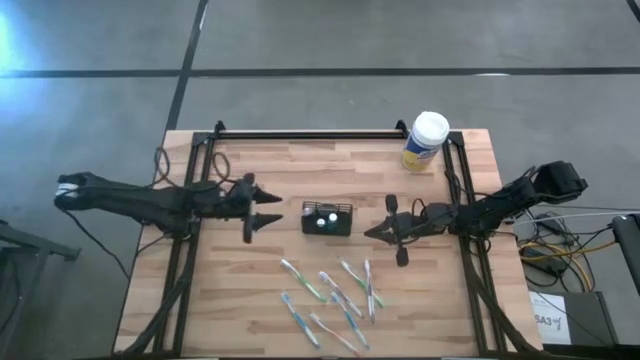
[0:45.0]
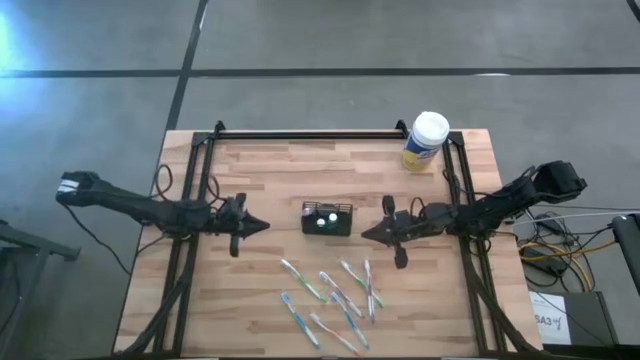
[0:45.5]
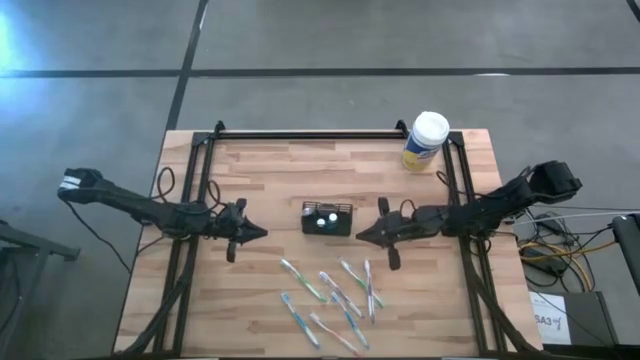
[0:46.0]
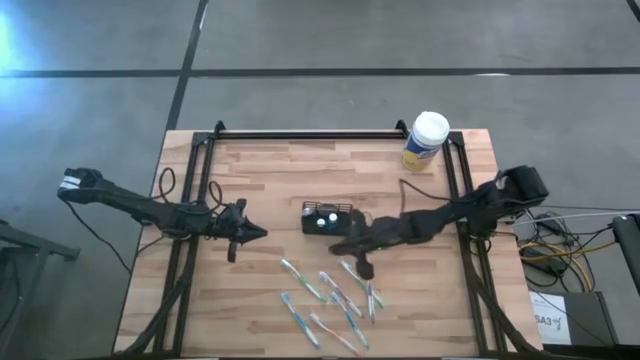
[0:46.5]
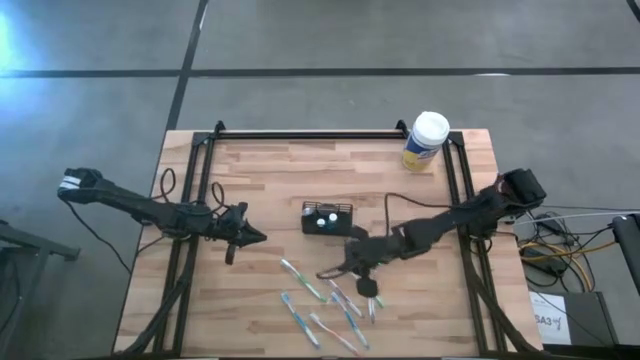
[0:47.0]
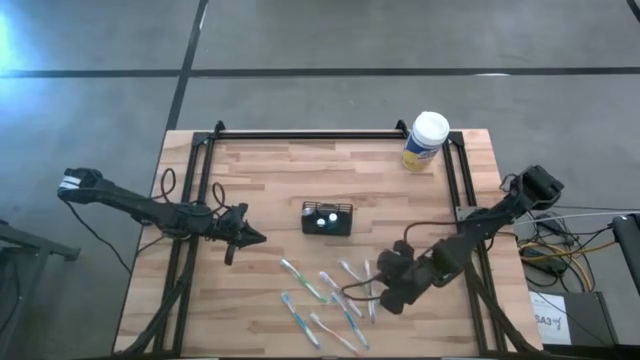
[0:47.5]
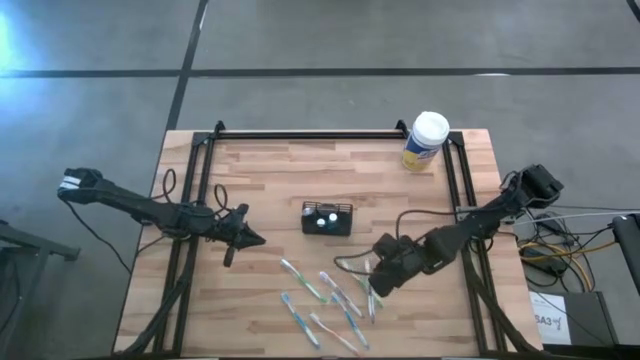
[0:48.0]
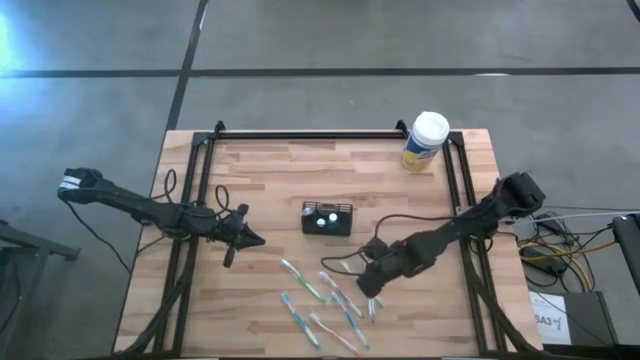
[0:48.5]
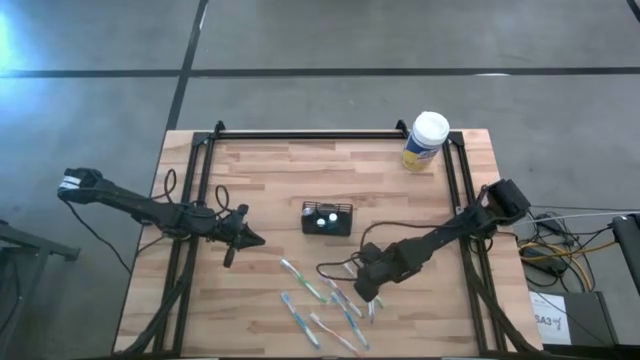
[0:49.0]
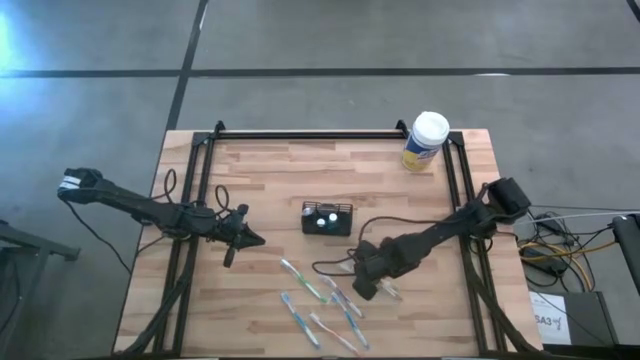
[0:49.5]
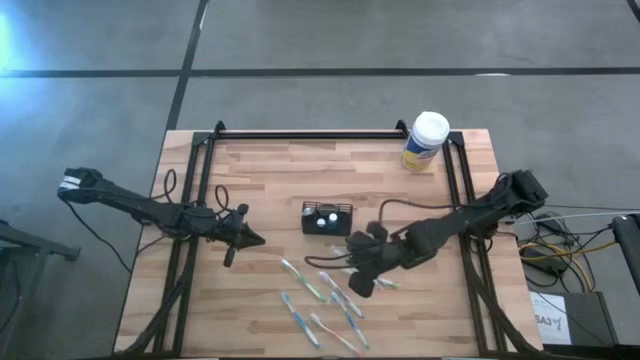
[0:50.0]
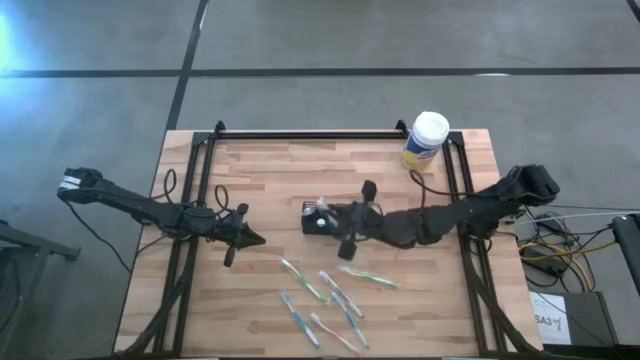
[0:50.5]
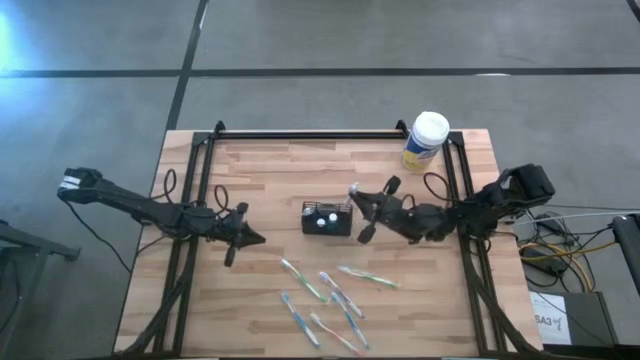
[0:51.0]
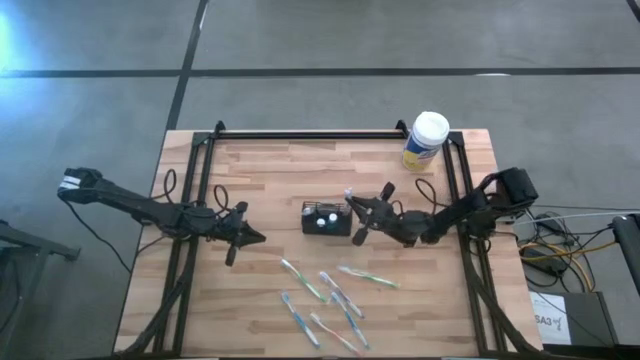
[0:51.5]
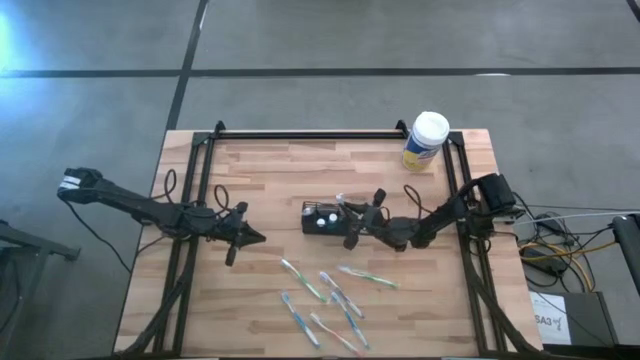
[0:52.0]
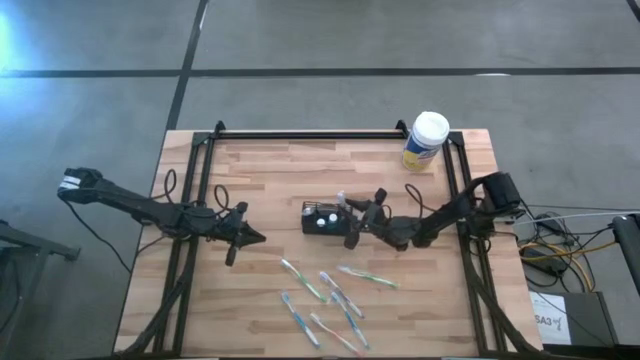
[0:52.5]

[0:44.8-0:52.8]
Task: Pick & Place toothbrushing station
Put the right purple toothbrush into the black mesh organizer

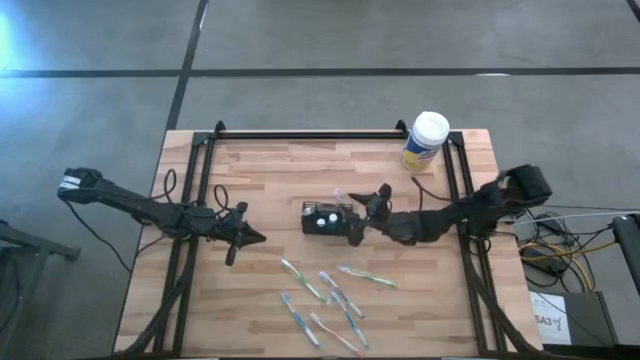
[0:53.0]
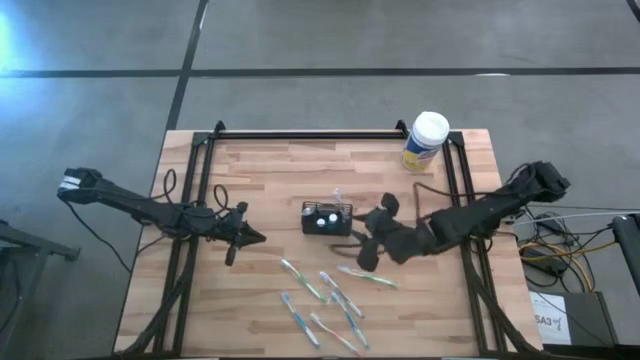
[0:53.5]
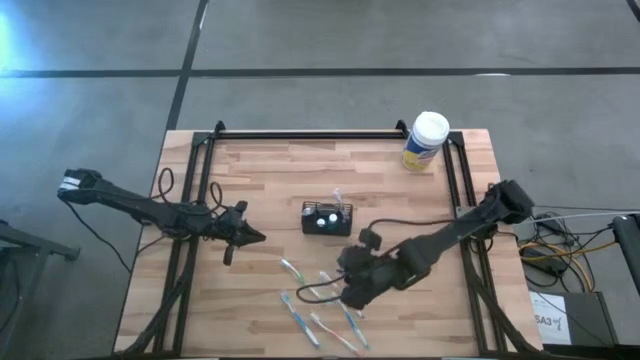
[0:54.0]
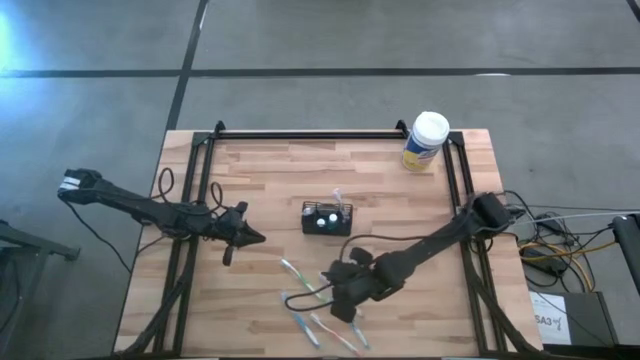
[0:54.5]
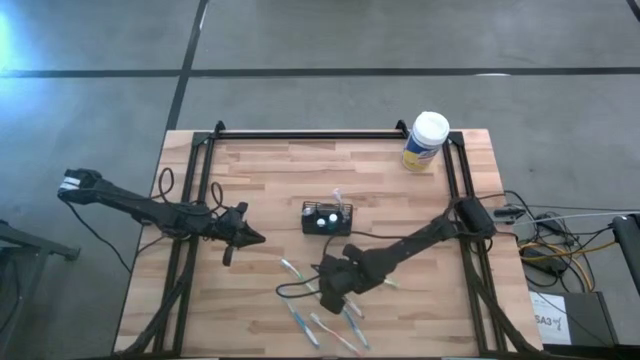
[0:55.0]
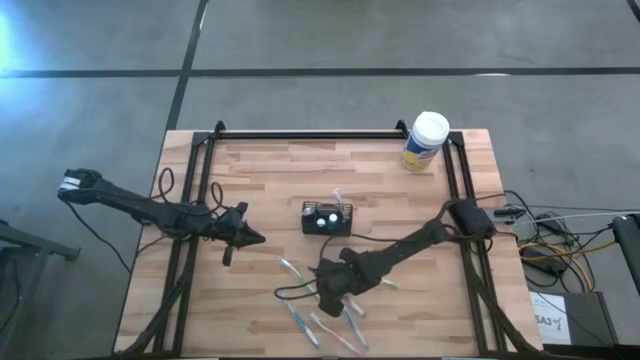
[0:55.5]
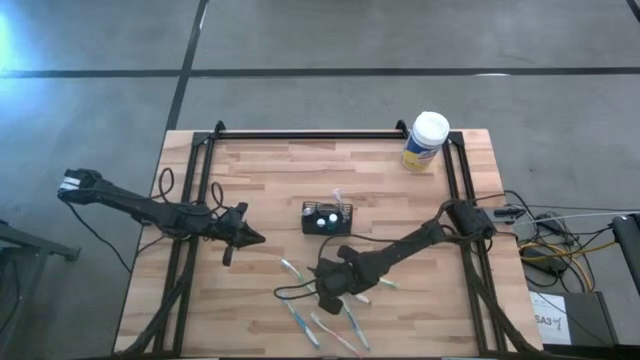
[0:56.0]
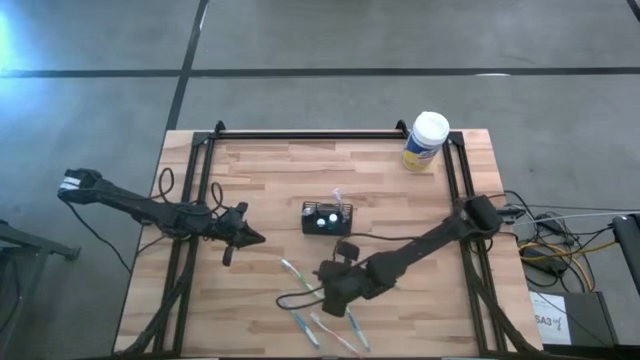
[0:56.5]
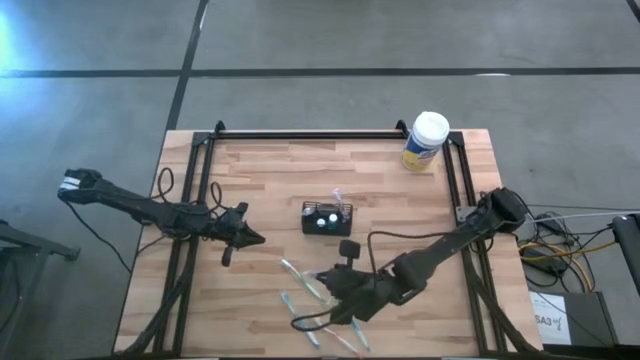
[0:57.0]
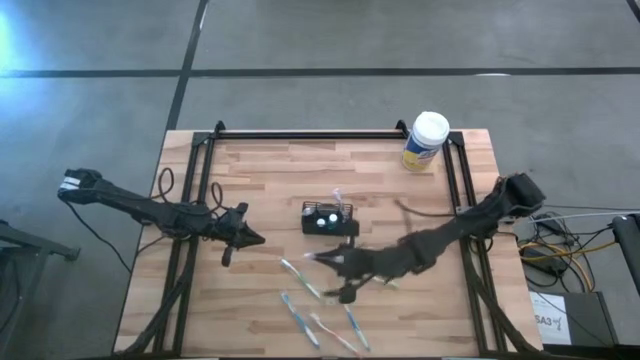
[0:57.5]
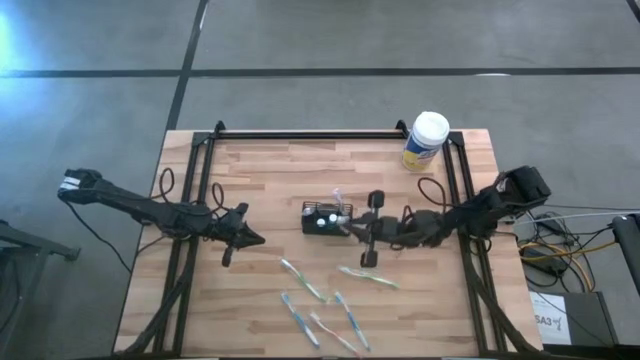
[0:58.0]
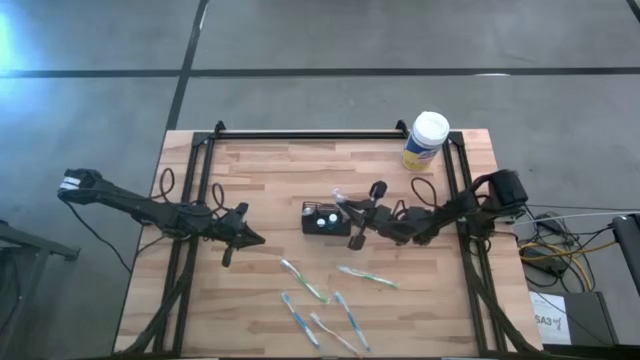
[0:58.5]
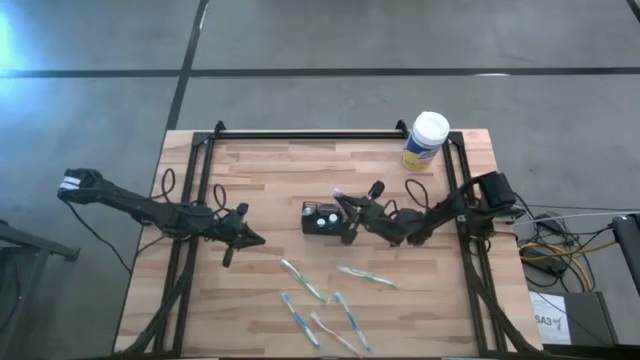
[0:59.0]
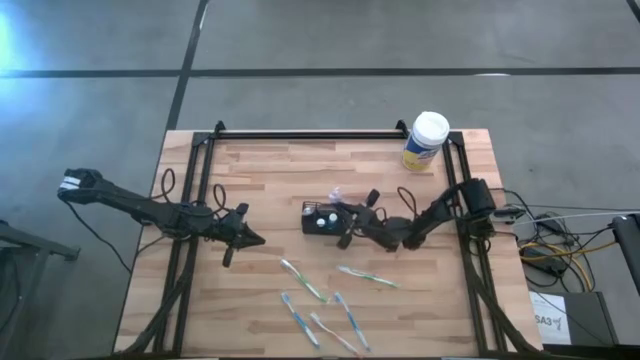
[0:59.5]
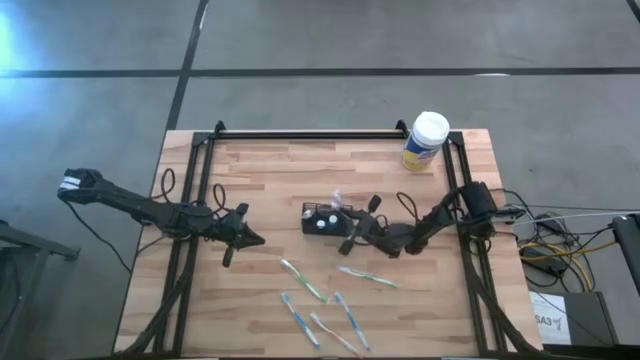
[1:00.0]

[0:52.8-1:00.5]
Put the purple toothbrush into the black mesh organizer

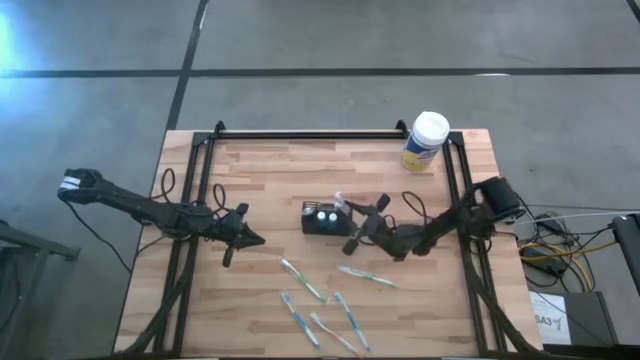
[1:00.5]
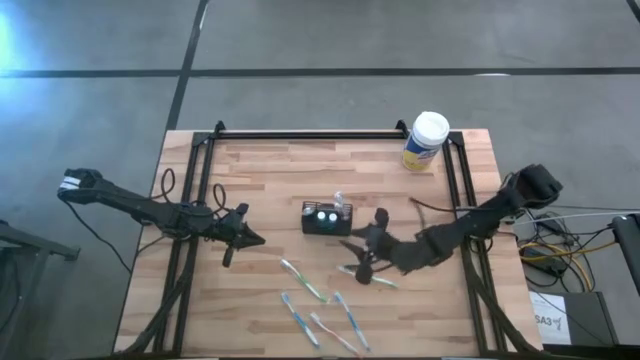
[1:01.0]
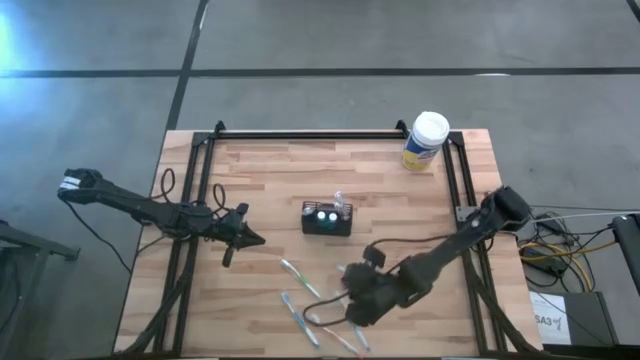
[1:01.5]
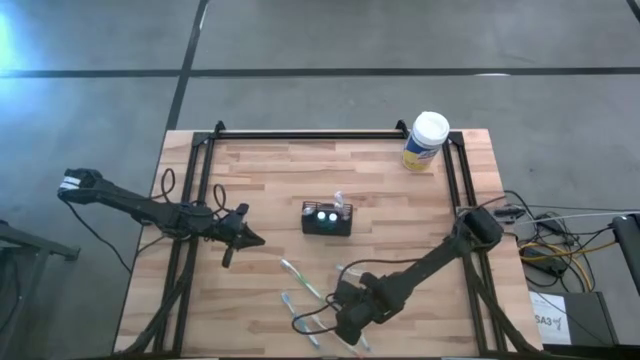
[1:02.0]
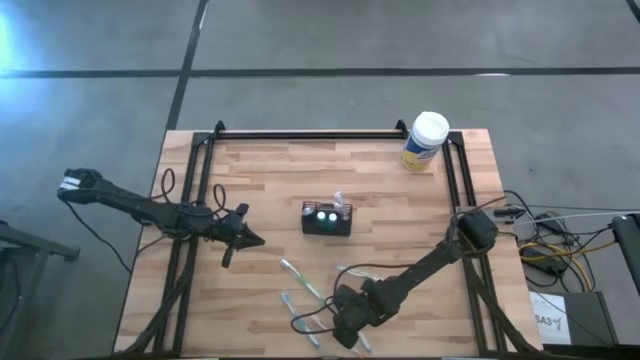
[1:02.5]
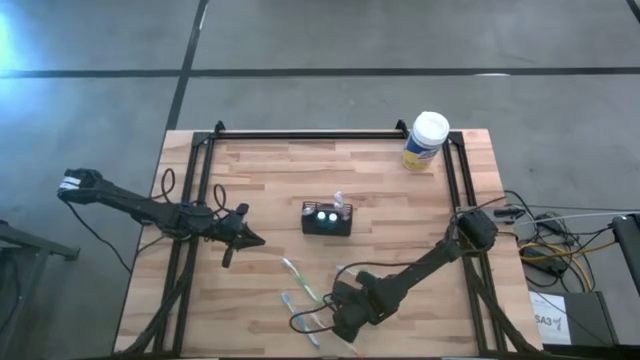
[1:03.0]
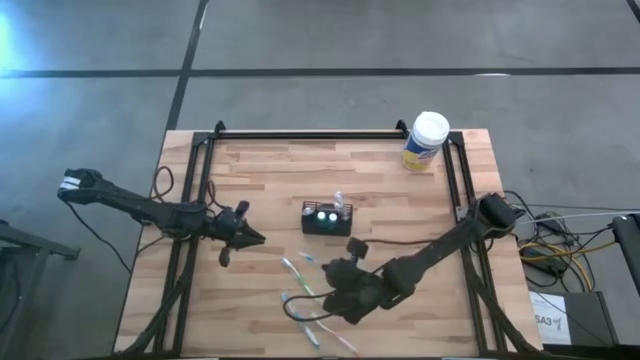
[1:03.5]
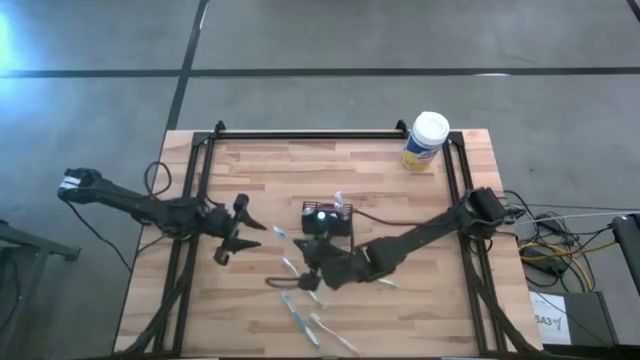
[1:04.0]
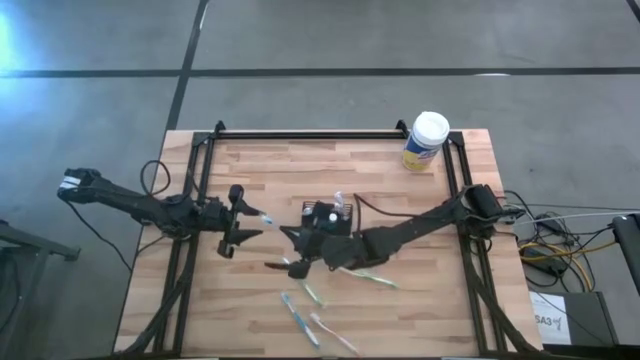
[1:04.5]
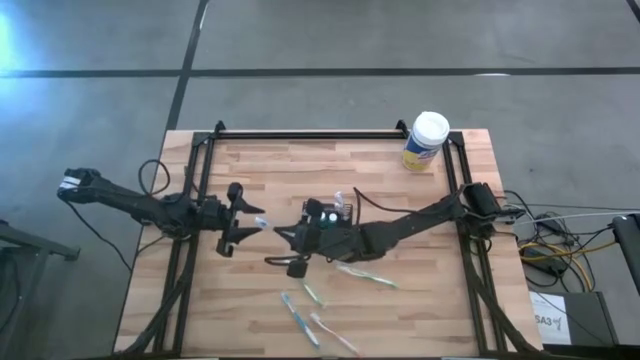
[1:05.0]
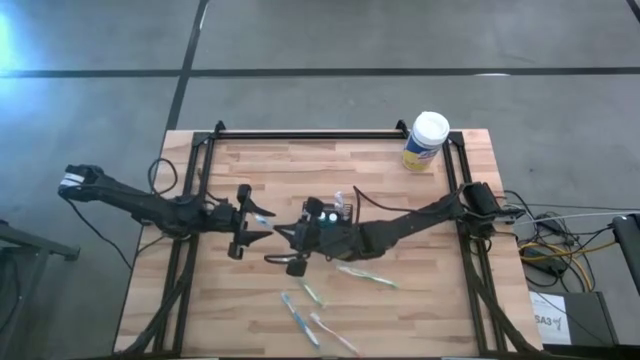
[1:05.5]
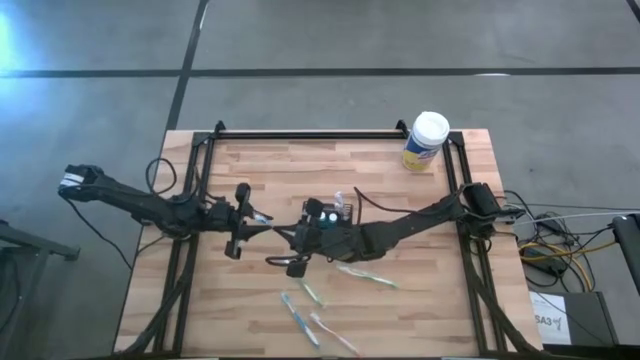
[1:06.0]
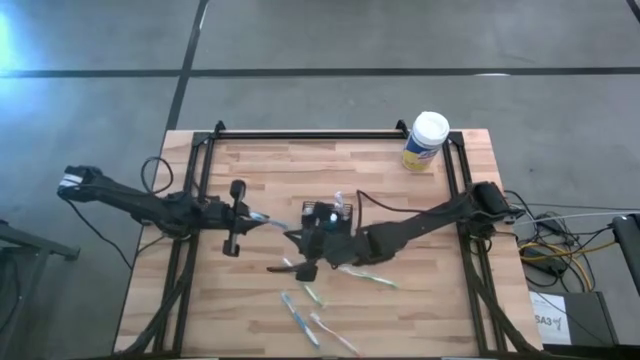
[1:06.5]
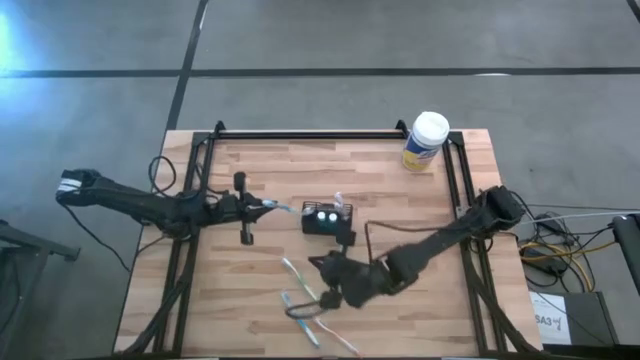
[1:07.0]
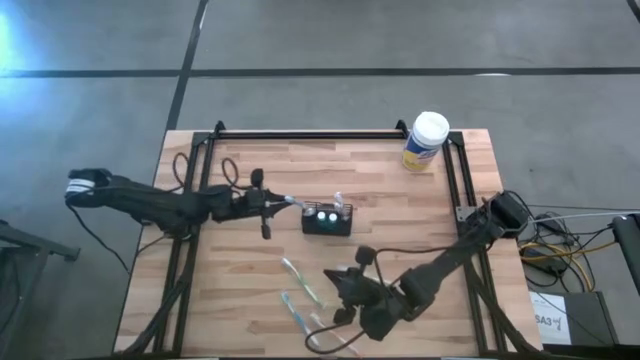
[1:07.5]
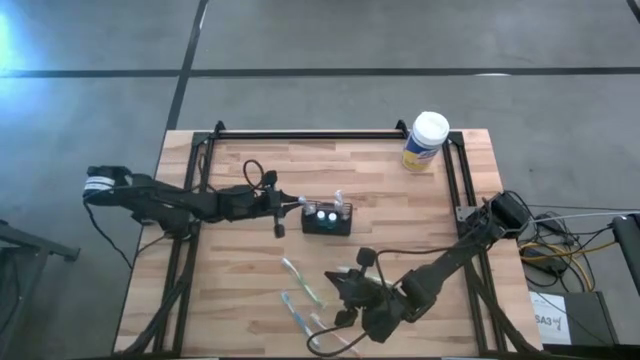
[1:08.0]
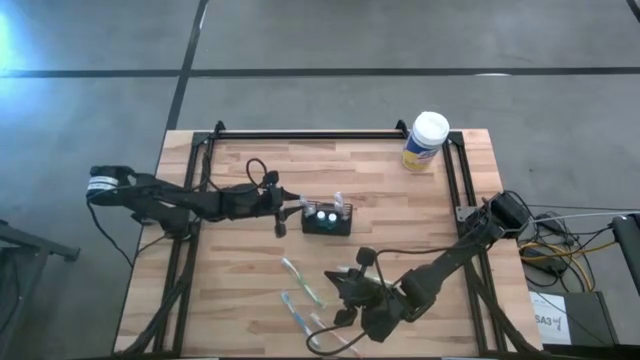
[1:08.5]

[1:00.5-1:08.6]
Put the right blue toothbrush into the black mesh organizer
